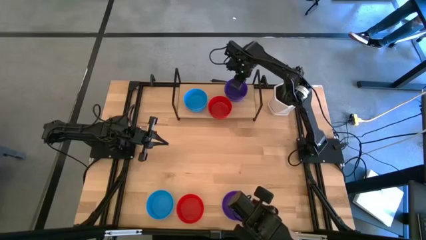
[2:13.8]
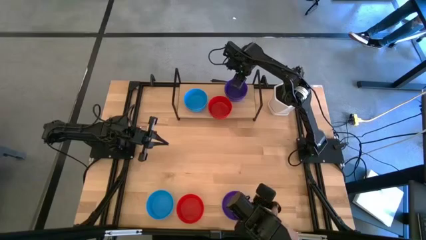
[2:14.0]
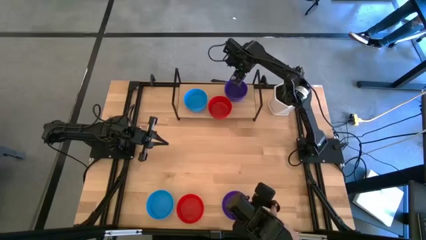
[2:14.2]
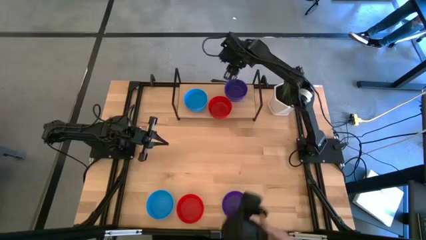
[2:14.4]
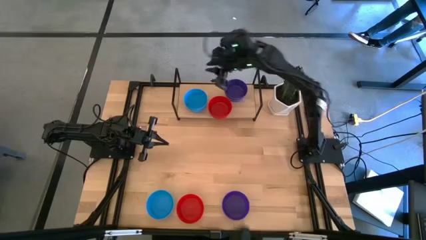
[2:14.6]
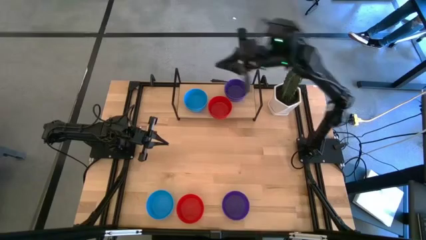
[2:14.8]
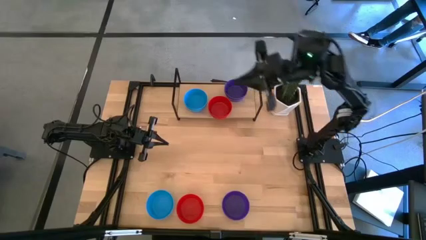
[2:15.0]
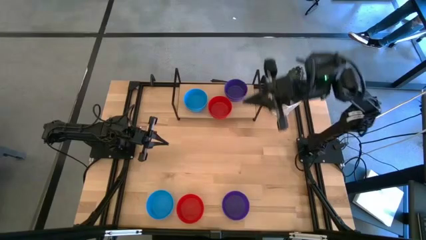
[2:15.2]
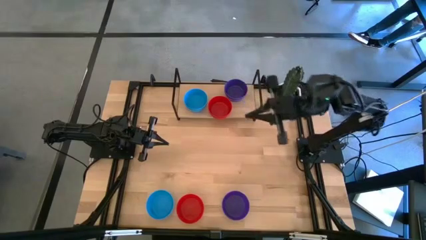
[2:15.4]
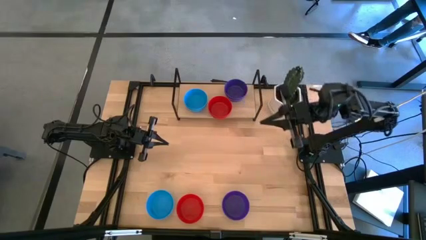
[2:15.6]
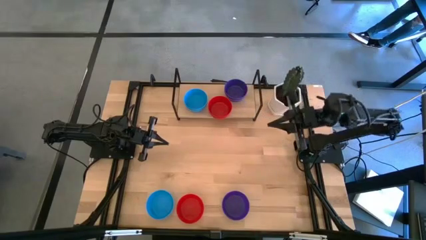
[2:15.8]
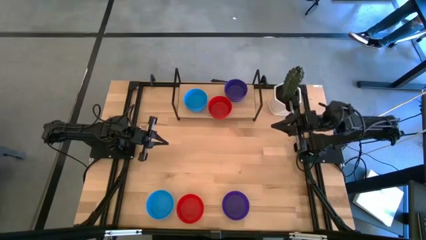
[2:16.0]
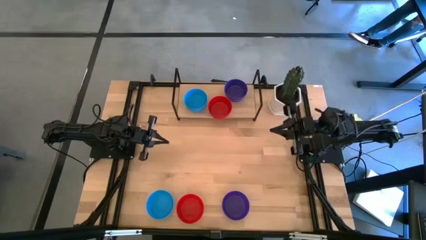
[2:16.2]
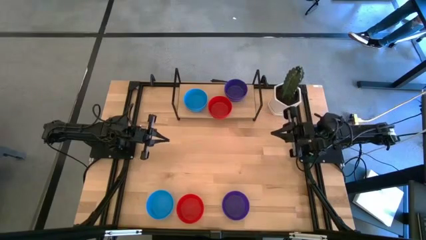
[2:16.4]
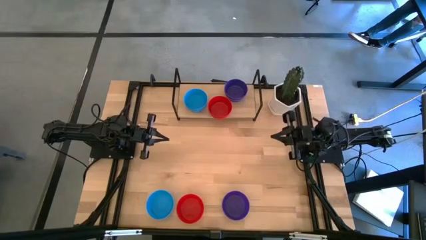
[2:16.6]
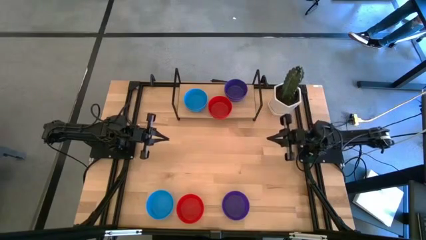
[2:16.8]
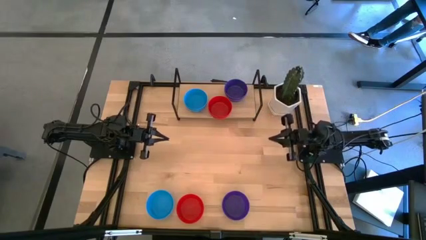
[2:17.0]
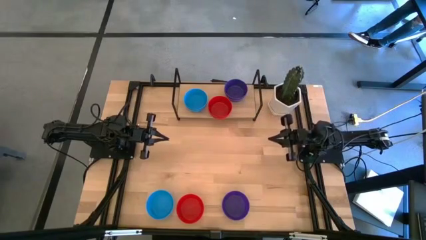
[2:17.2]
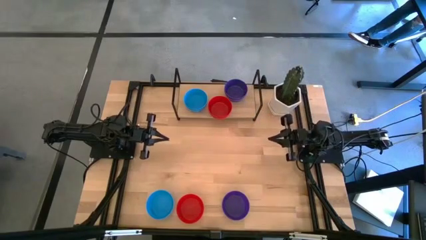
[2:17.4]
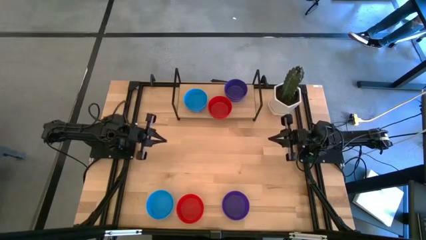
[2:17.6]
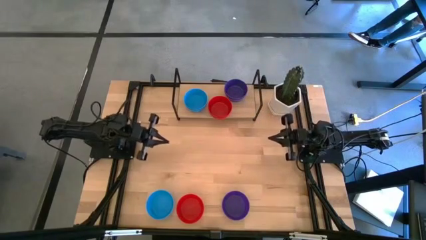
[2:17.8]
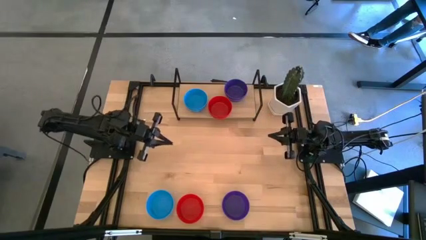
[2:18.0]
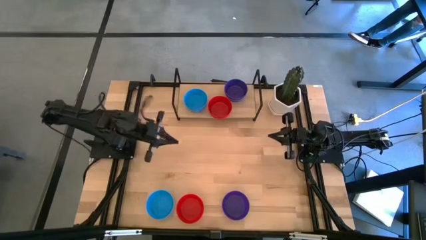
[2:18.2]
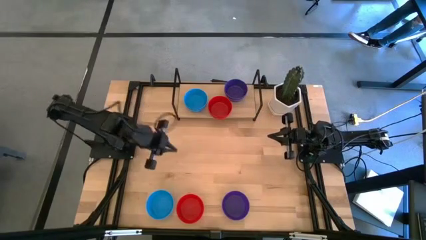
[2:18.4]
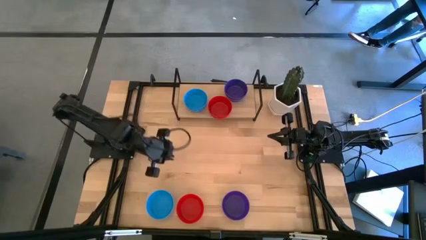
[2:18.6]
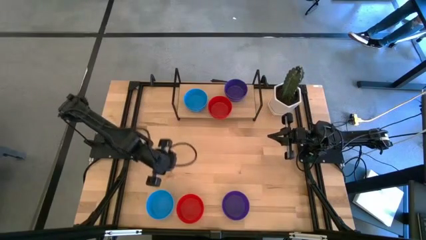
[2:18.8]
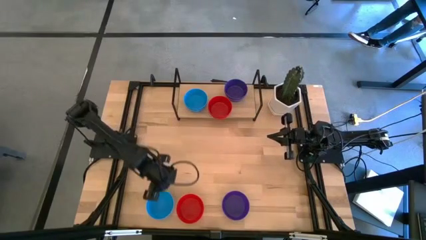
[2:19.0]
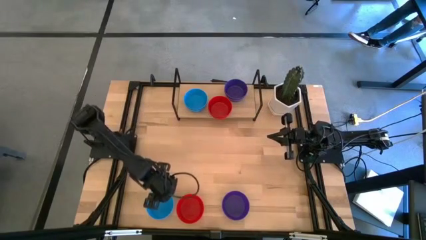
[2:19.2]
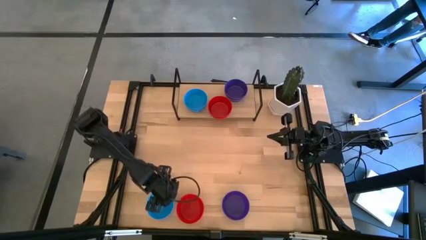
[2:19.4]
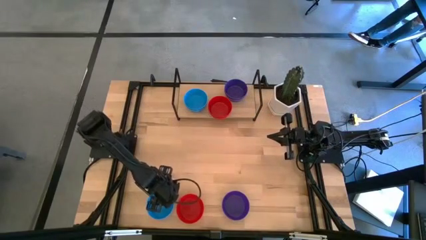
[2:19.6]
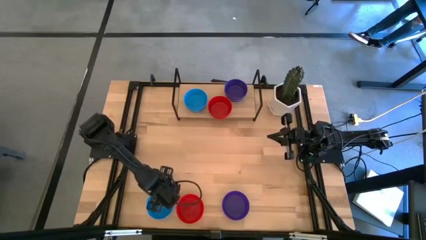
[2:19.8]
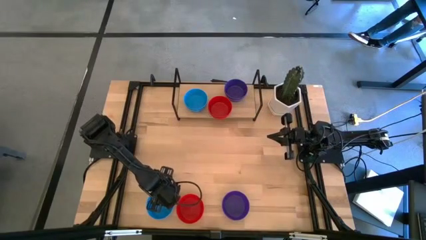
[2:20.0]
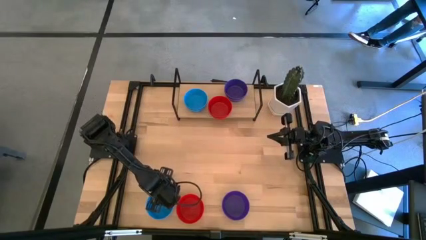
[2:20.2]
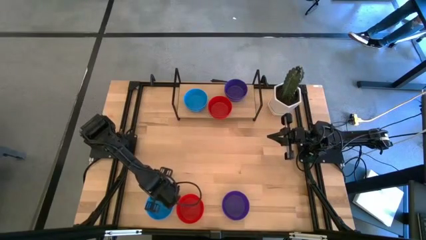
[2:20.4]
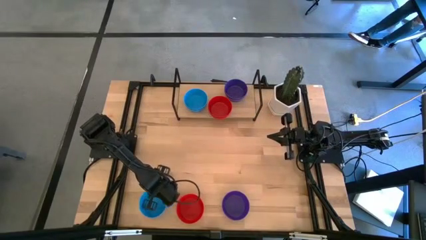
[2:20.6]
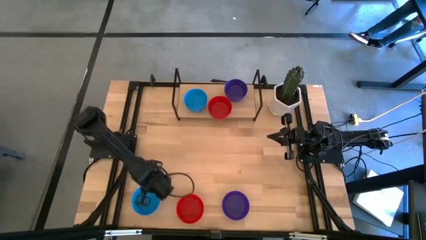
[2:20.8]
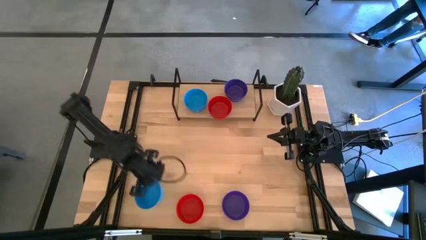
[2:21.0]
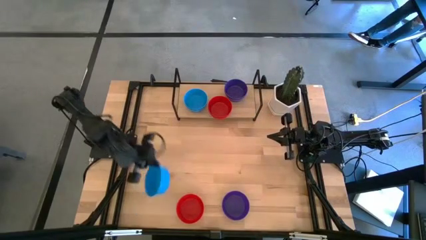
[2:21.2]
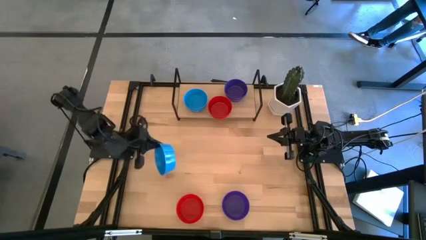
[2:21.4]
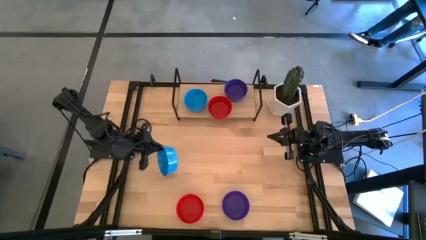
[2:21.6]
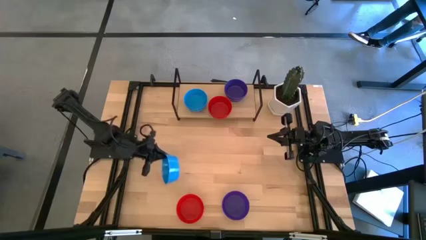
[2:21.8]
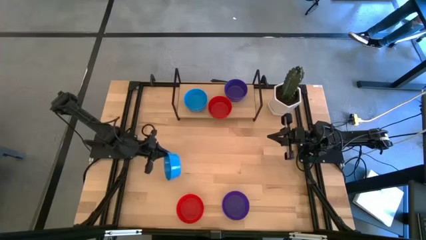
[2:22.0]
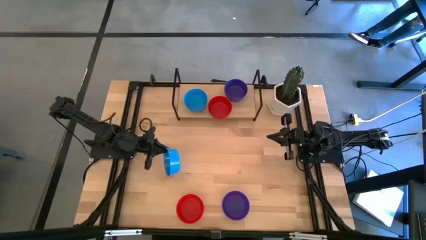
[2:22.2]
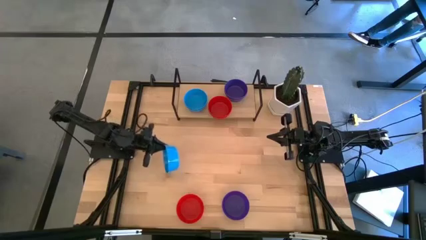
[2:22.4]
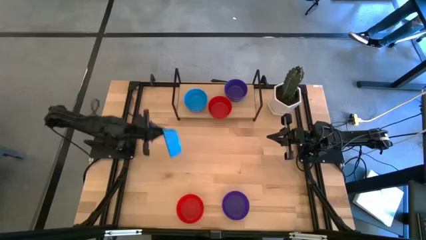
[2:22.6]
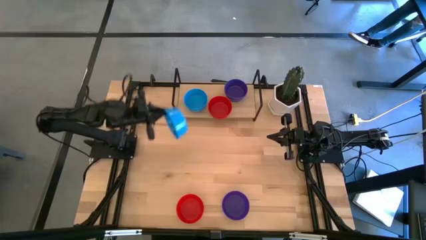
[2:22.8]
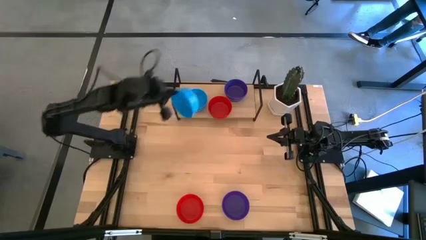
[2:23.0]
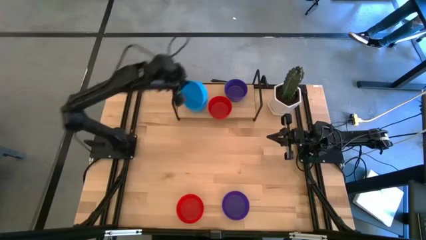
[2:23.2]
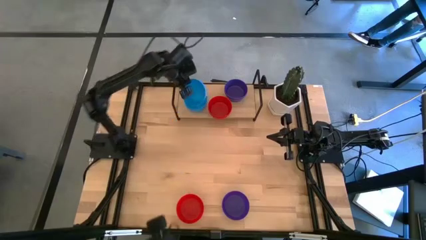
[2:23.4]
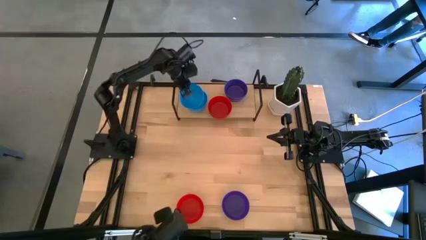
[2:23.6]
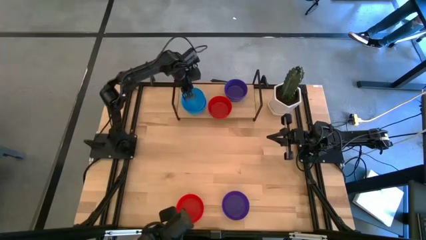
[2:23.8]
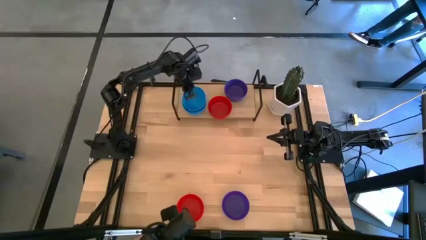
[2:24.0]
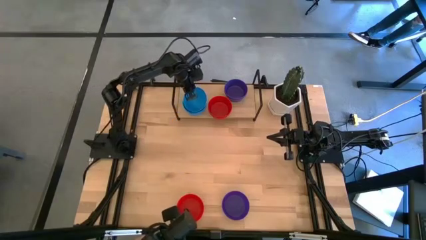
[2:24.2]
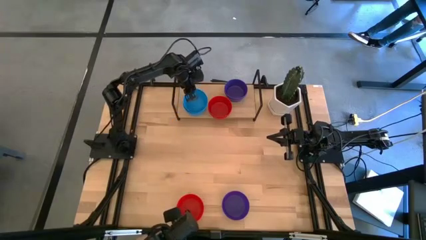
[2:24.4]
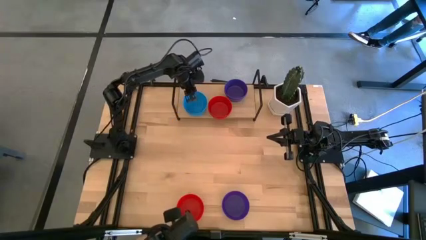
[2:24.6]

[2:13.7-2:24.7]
Task: Pick & Place Mini bowls
Stack the blue bowl on the blue bowl on the shelf
